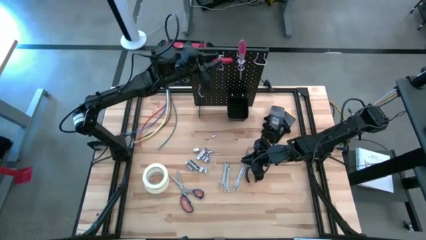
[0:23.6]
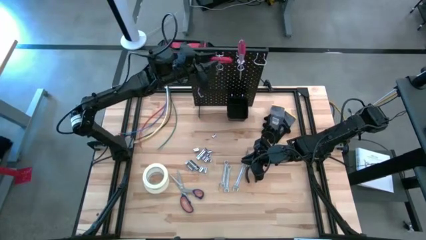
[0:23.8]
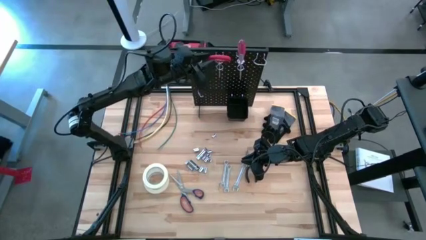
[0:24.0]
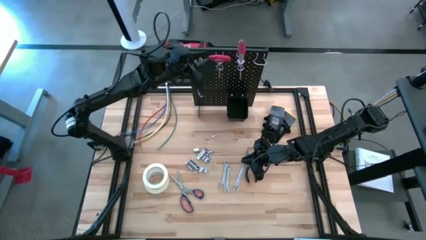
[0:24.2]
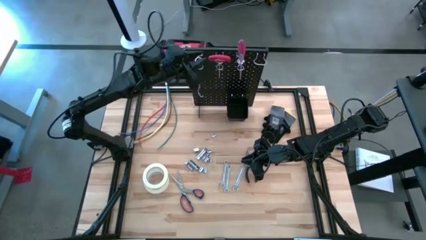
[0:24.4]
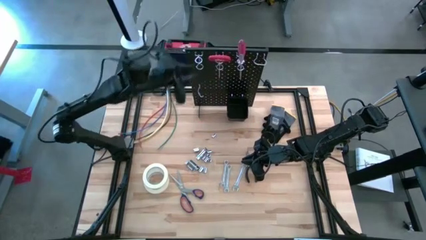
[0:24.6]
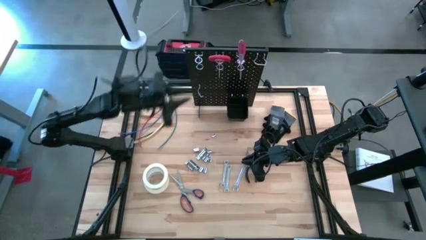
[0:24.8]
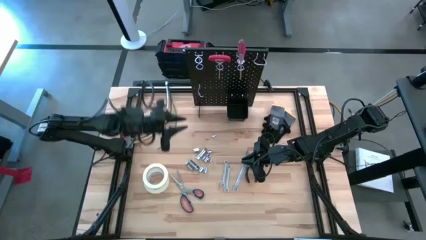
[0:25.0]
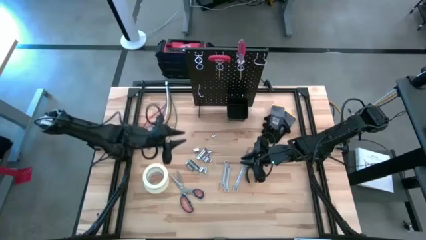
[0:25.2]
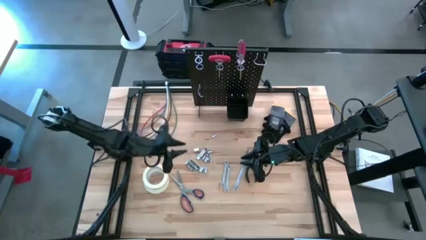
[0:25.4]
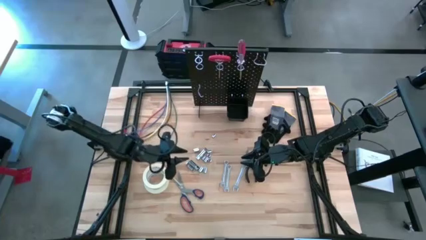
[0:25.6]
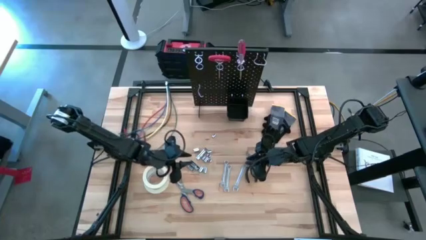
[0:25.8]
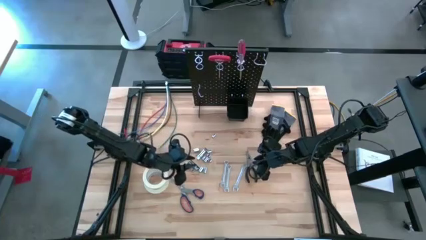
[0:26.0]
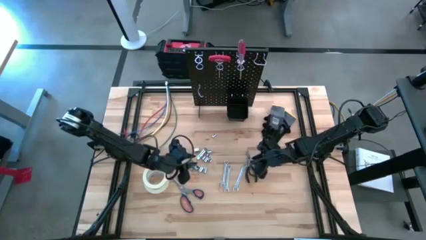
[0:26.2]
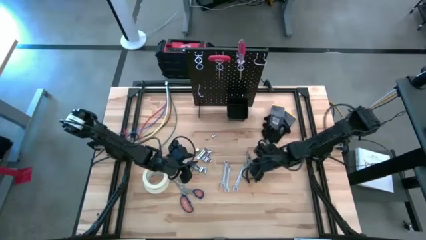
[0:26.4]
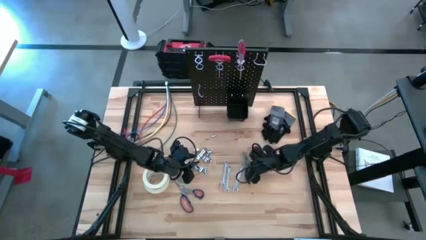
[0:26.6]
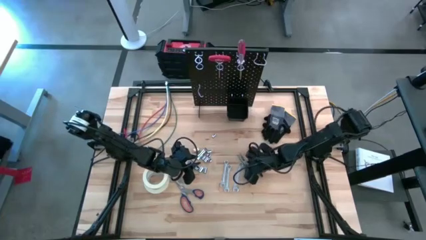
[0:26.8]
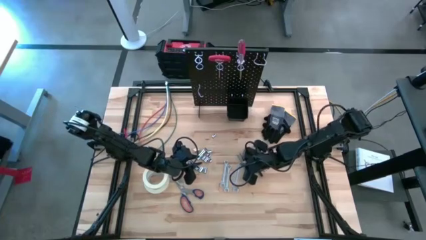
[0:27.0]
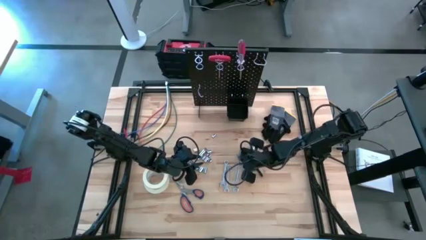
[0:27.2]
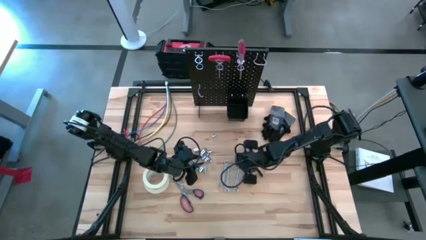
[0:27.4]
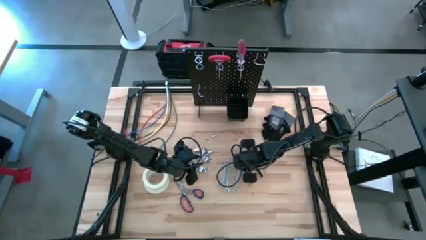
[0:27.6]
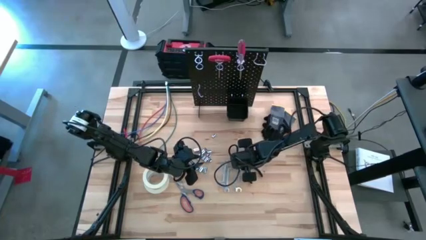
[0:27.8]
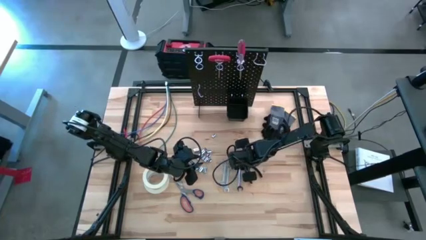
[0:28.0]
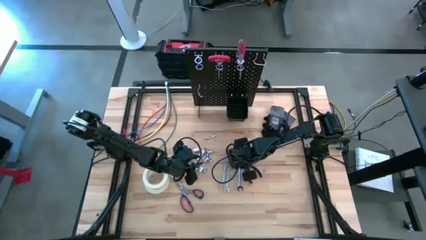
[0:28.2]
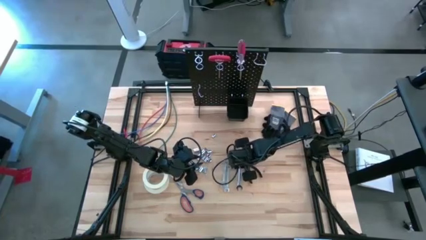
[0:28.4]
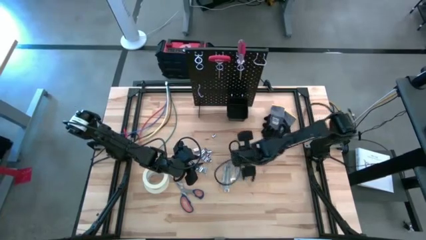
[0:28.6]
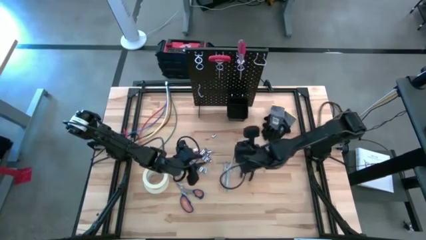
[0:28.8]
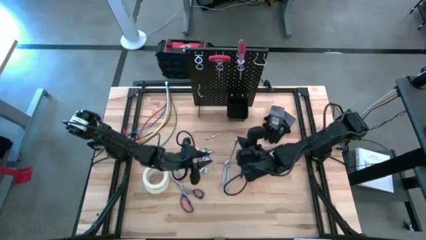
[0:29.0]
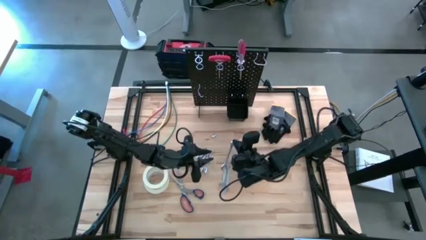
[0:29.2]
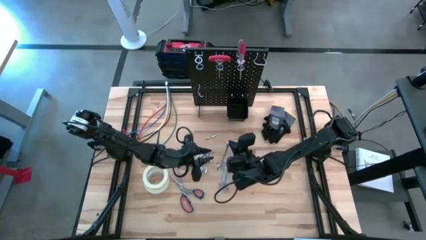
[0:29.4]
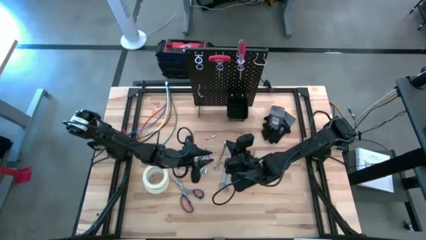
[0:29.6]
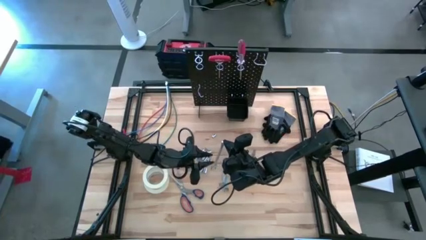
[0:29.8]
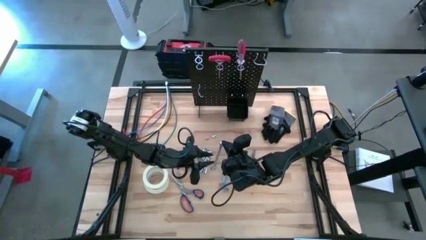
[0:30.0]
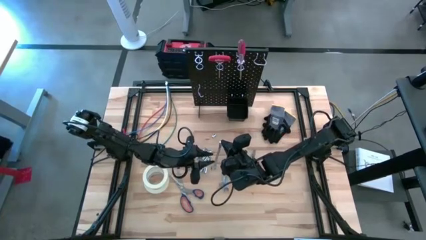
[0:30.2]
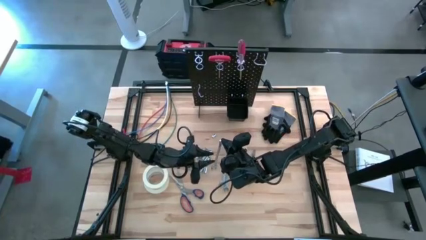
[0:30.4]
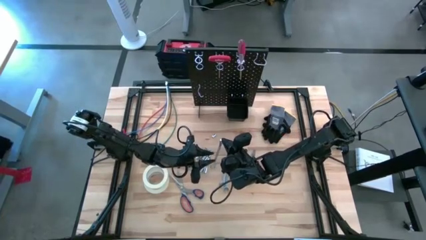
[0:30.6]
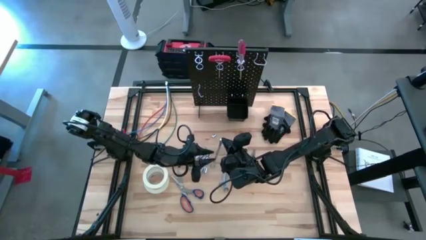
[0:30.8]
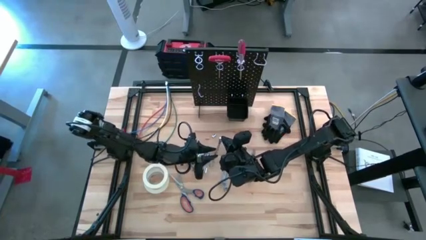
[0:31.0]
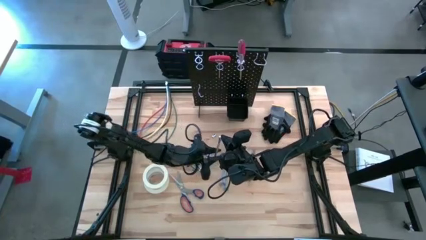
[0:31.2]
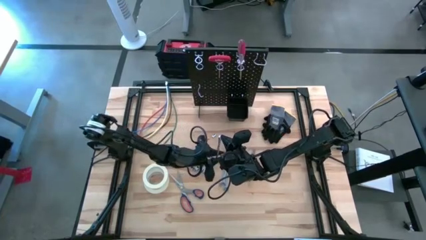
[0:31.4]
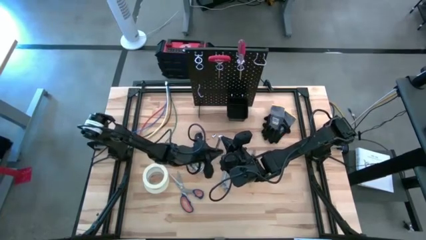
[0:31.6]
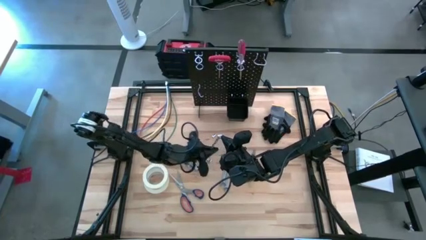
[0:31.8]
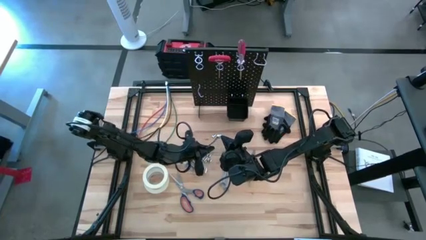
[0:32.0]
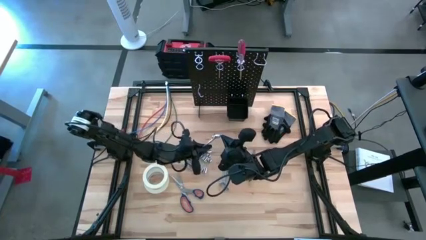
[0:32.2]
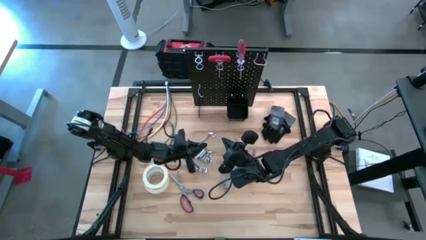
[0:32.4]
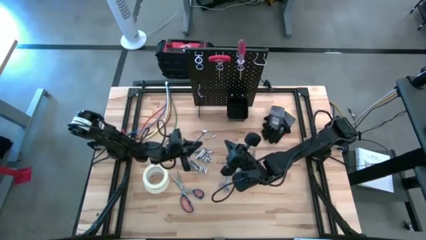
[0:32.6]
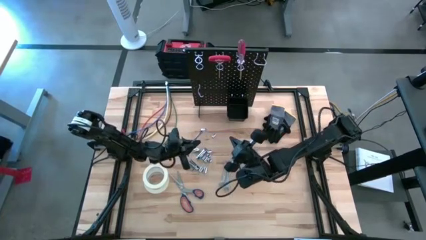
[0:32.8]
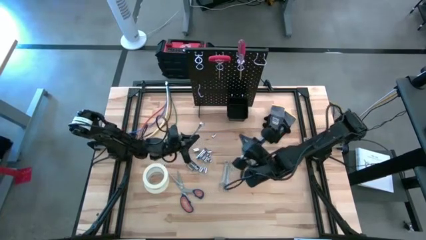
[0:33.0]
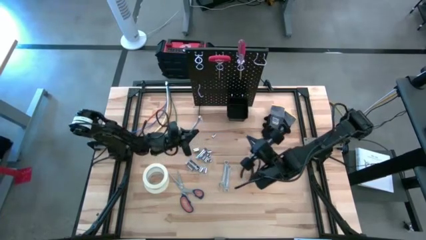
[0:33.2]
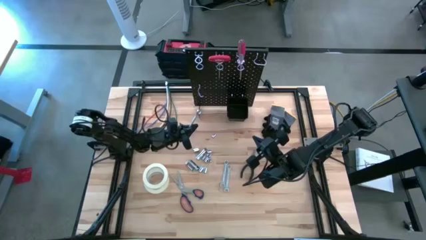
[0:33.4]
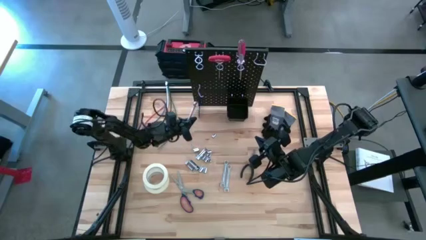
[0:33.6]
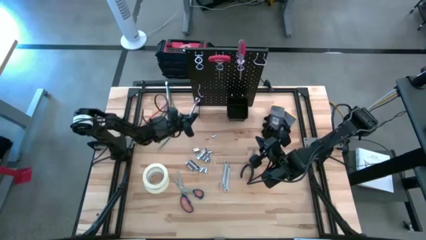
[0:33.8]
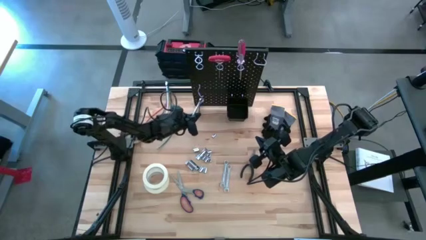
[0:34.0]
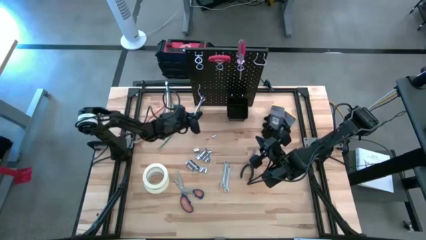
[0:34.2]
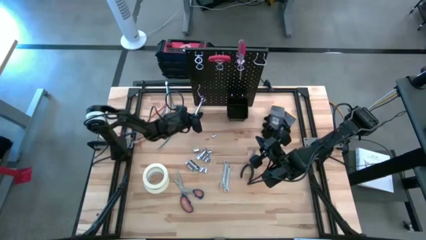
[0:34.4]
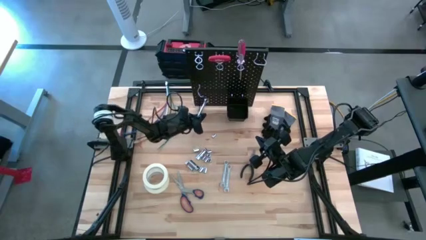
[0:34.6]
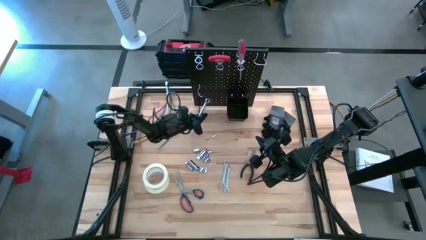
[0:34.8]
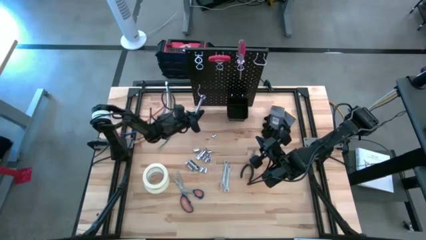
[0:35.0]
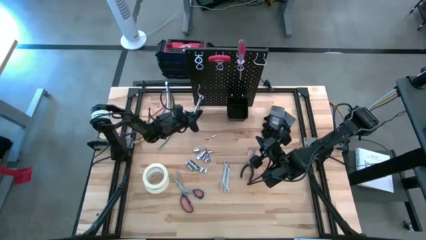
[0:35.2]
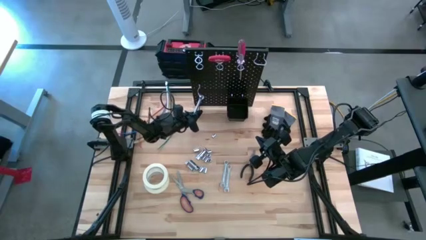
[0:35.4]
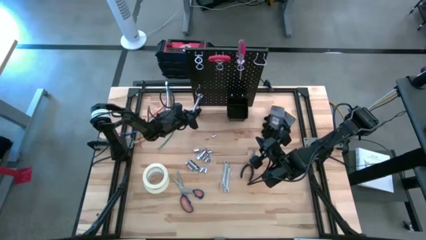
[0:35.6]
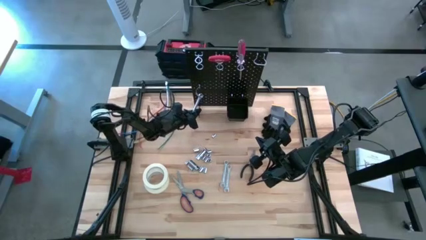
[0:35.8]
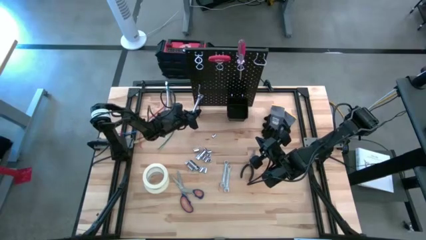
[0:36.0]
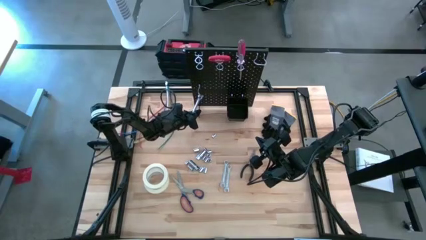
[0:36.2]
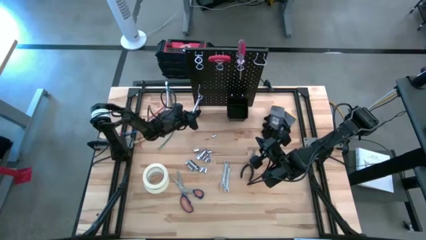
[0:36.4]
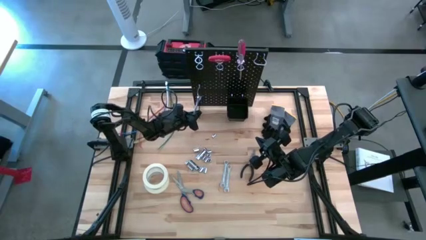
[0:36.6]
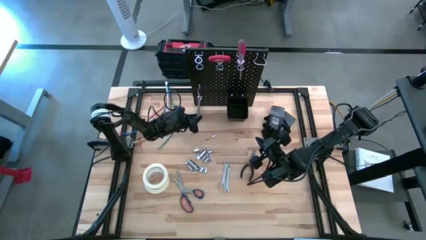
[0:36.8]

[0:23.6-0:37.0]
Task: Hang tools onto peg board
Hang the right wrench on the peg board

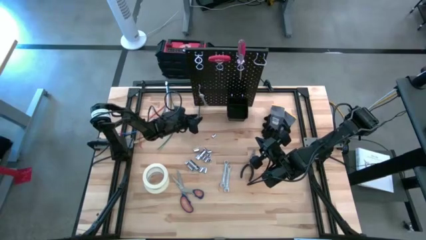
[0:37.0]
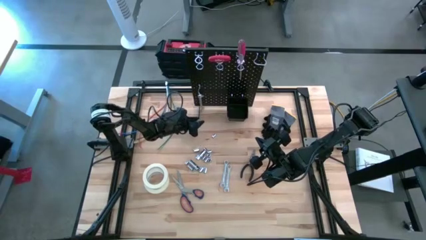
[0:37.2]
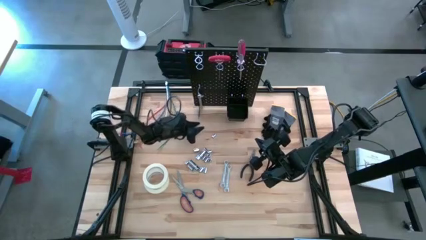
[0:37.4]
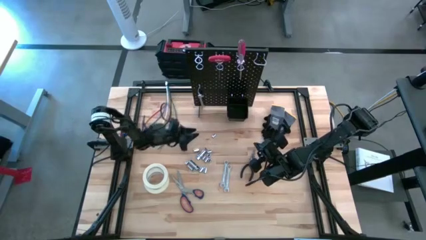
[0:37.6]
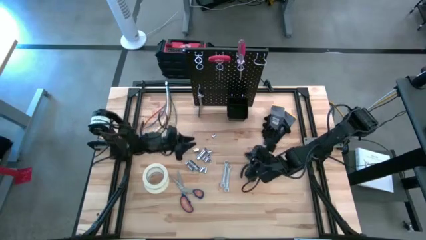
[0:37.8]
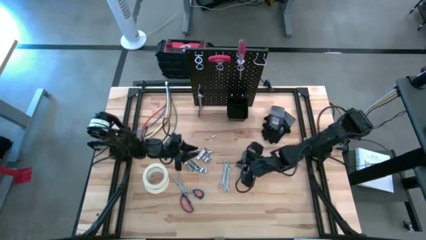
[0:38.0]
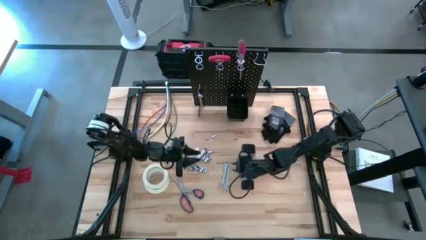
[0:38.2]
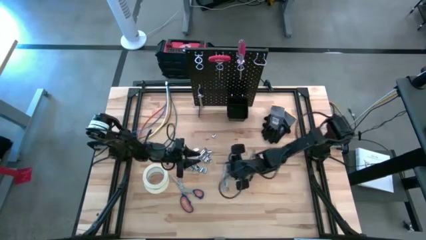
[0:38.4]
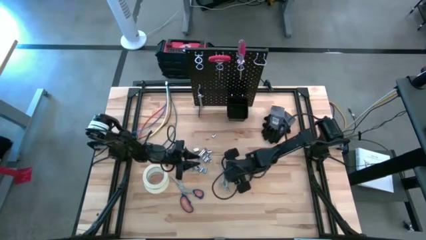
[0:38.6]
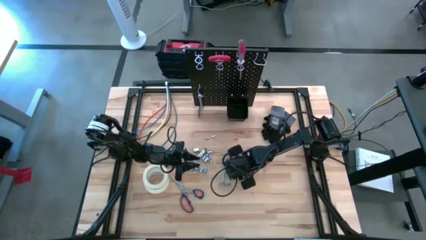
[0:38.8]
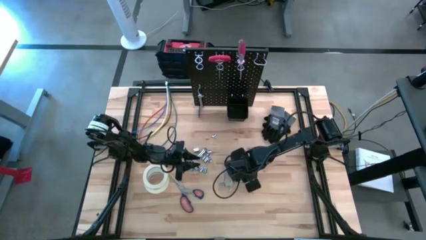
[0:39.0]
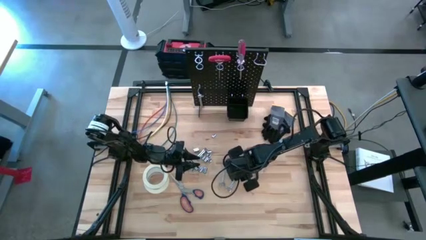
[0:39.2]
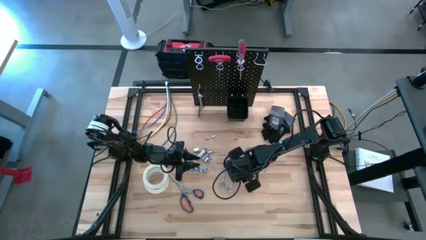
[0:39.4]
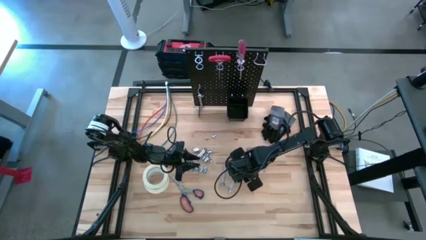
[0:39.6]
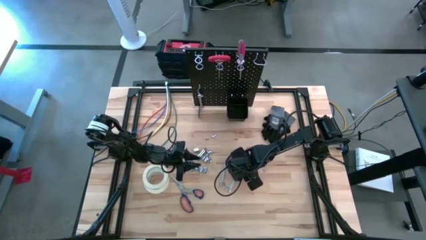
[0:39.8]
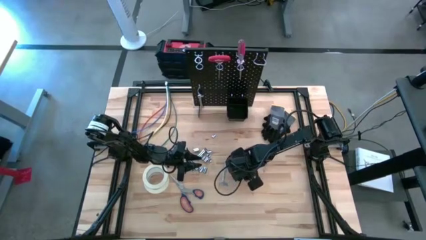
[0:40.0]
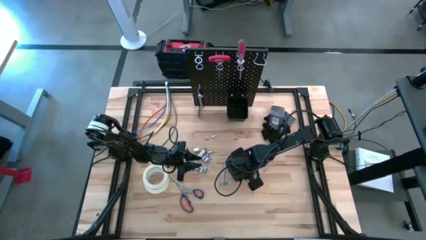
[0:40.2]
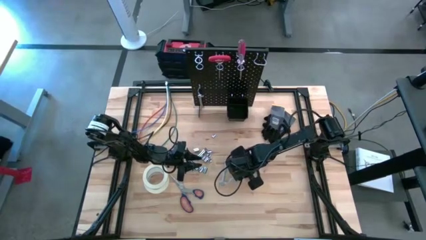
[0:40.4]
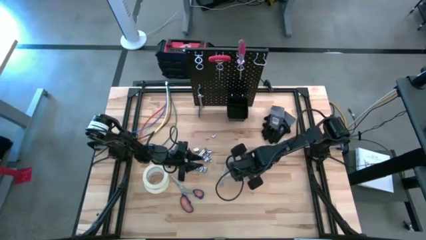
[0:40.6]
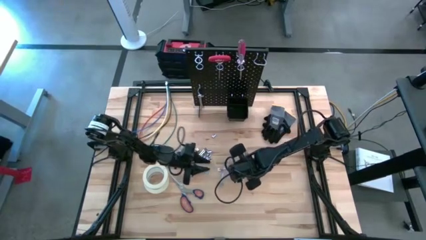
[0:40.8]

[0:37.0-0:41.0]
Hang the wrench on the peg board
